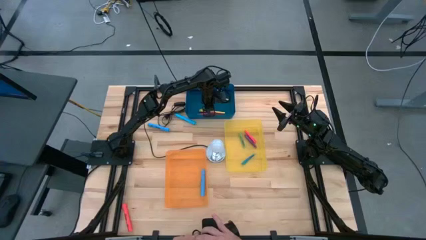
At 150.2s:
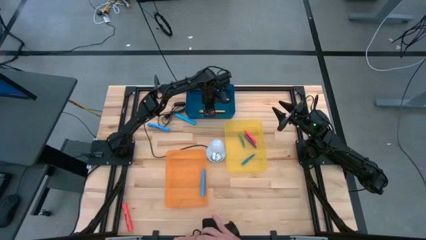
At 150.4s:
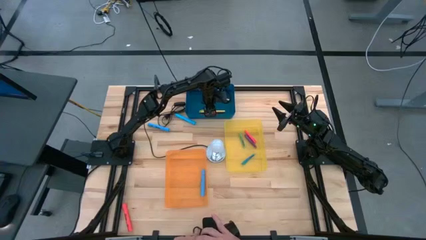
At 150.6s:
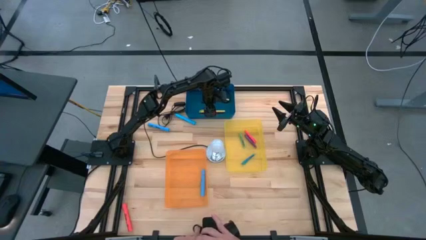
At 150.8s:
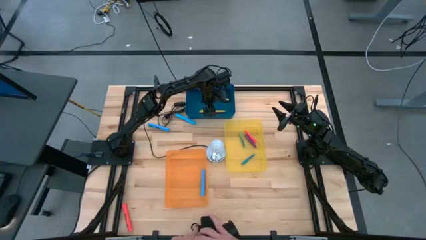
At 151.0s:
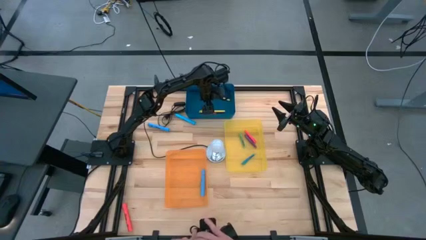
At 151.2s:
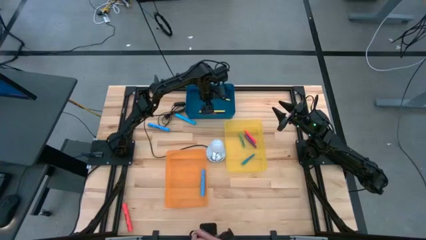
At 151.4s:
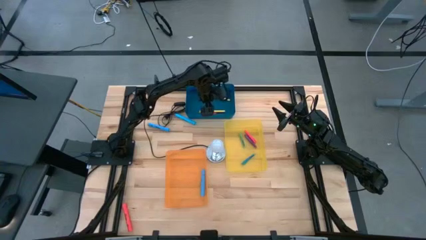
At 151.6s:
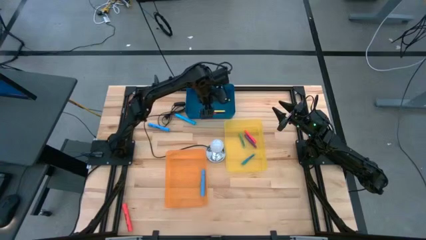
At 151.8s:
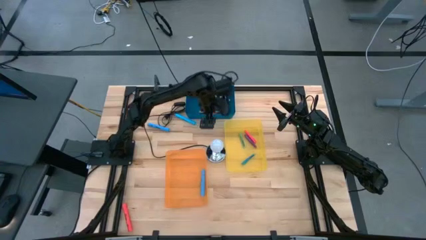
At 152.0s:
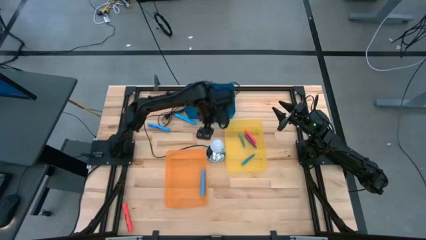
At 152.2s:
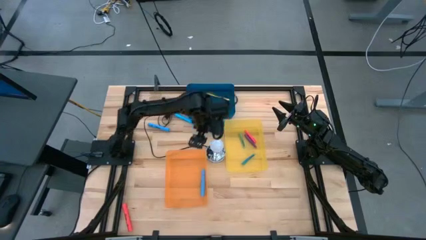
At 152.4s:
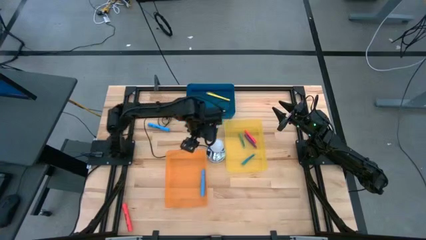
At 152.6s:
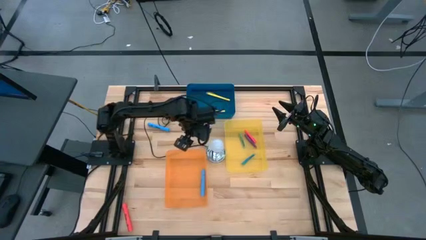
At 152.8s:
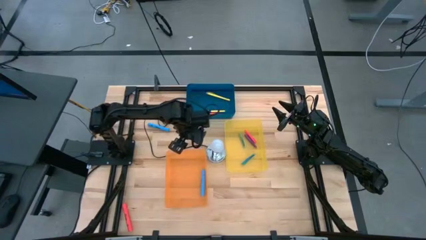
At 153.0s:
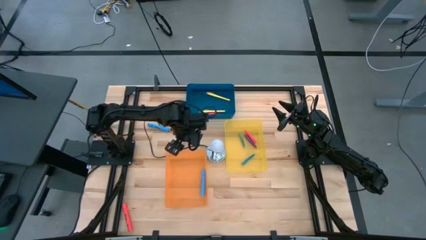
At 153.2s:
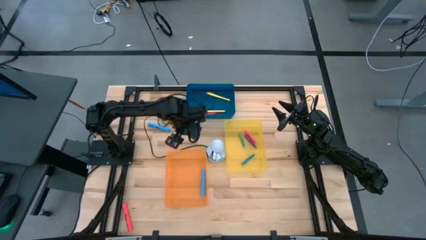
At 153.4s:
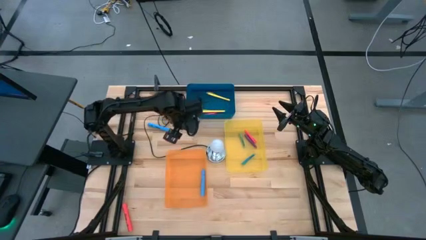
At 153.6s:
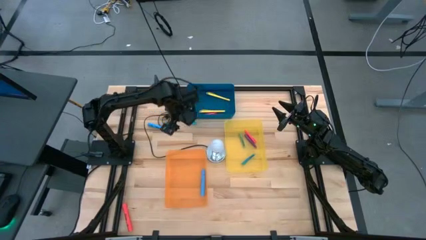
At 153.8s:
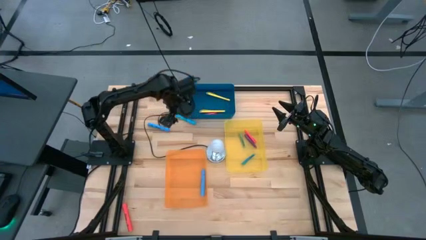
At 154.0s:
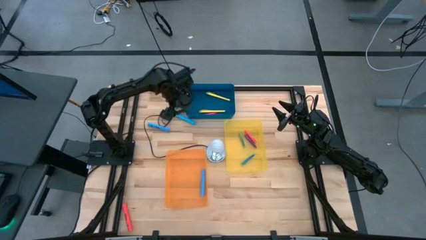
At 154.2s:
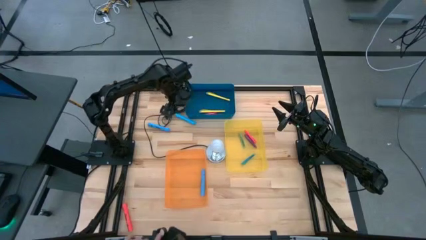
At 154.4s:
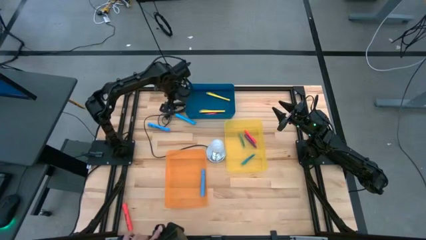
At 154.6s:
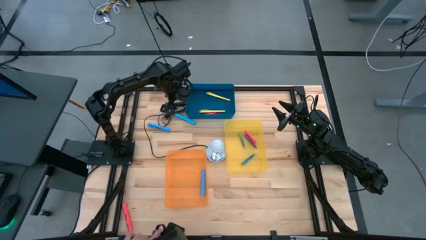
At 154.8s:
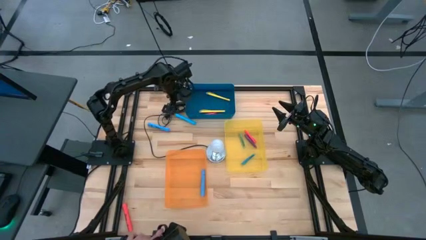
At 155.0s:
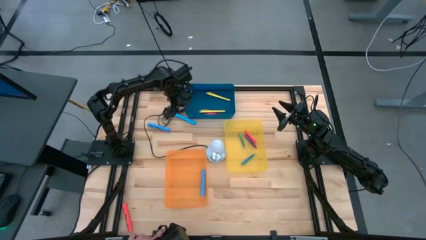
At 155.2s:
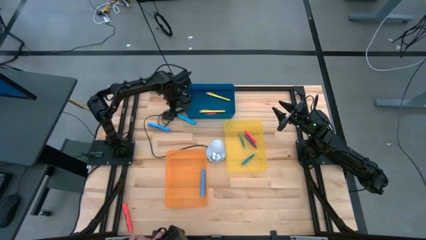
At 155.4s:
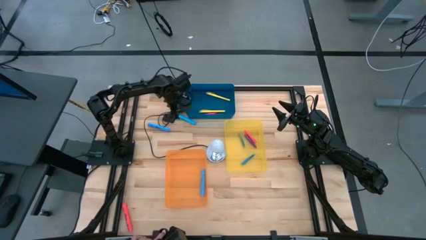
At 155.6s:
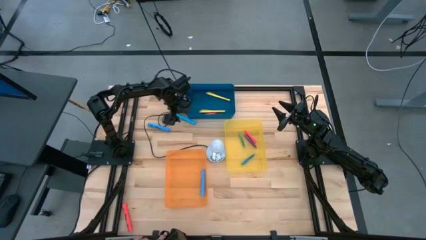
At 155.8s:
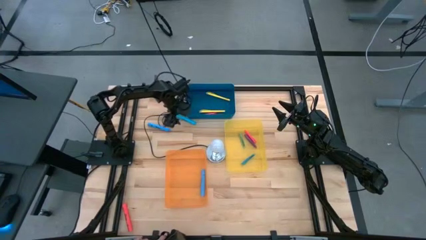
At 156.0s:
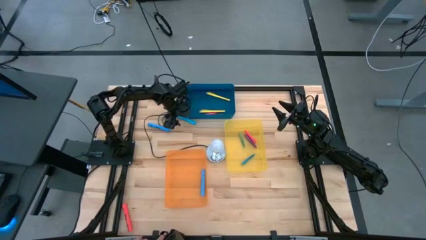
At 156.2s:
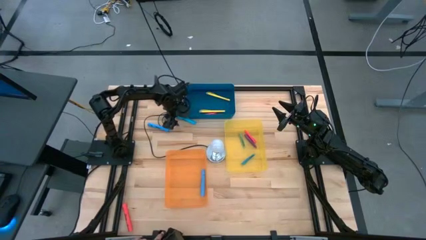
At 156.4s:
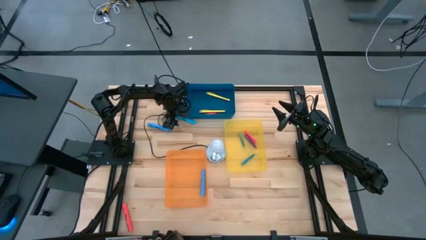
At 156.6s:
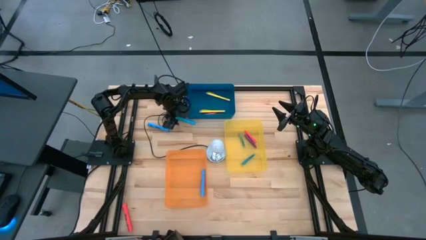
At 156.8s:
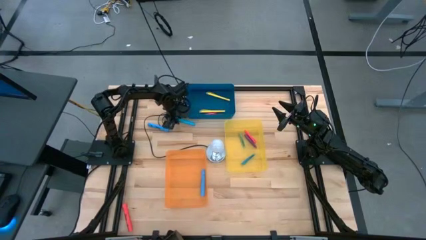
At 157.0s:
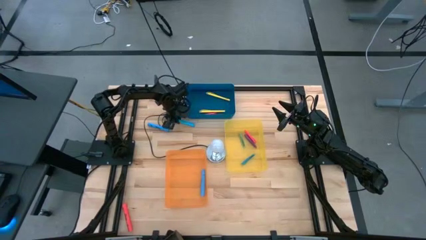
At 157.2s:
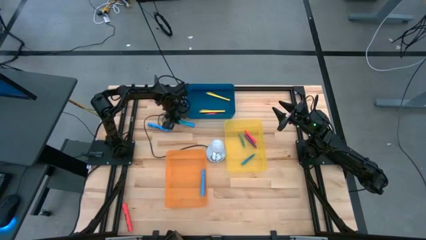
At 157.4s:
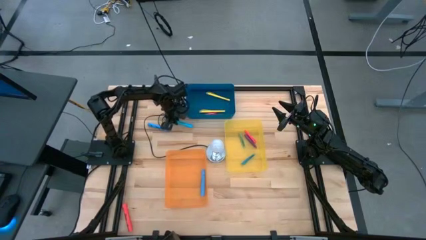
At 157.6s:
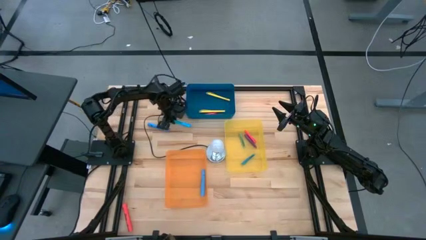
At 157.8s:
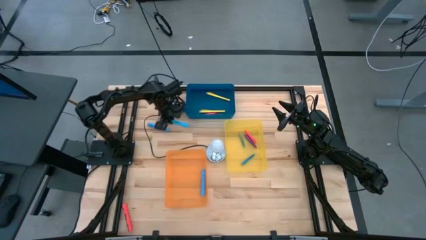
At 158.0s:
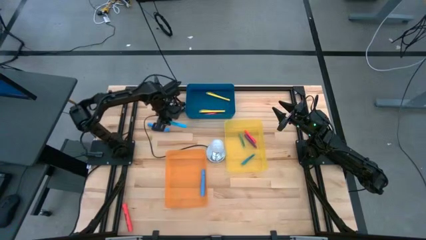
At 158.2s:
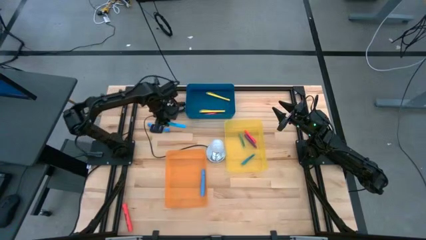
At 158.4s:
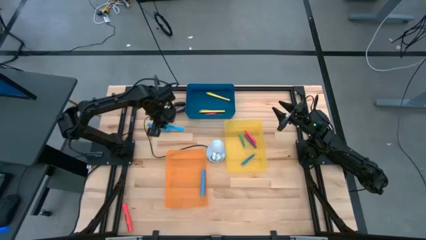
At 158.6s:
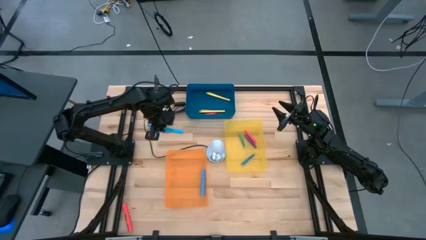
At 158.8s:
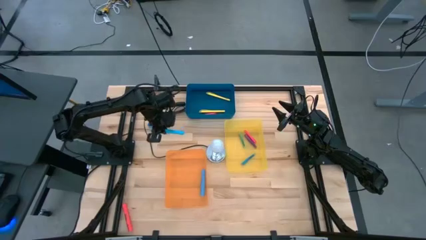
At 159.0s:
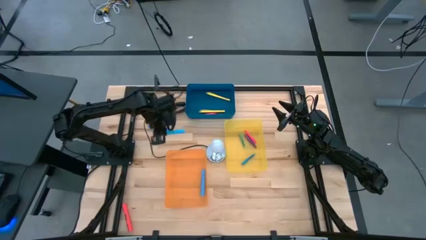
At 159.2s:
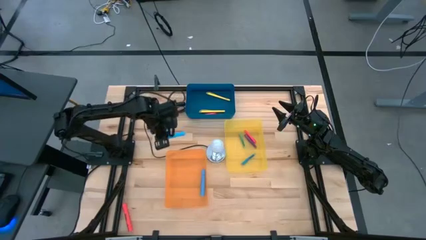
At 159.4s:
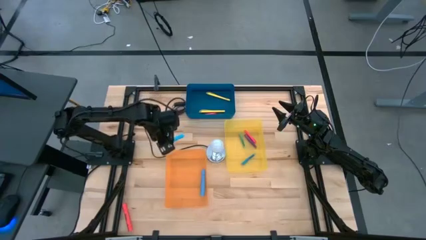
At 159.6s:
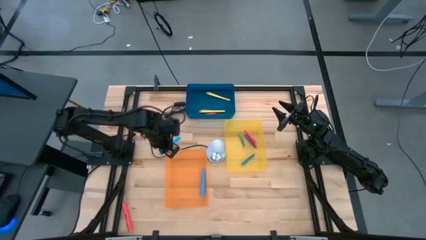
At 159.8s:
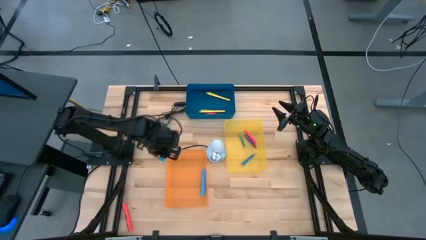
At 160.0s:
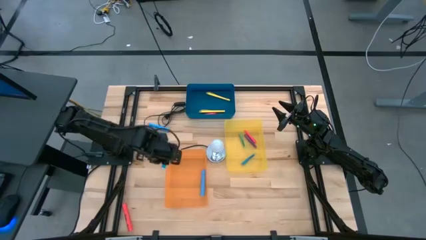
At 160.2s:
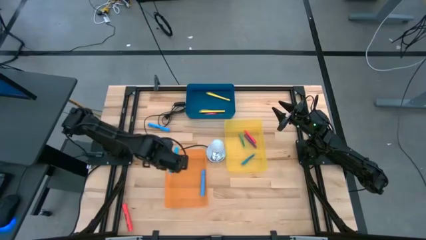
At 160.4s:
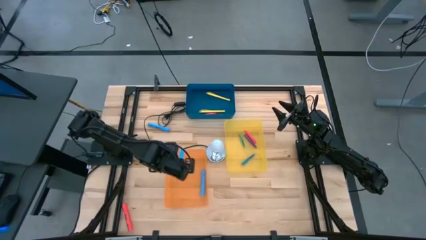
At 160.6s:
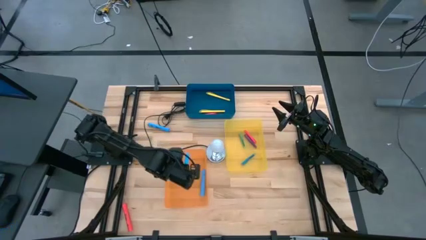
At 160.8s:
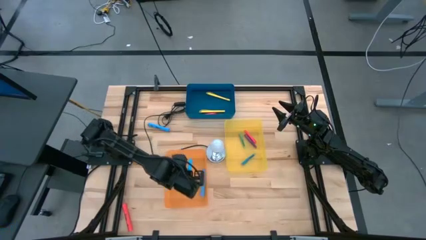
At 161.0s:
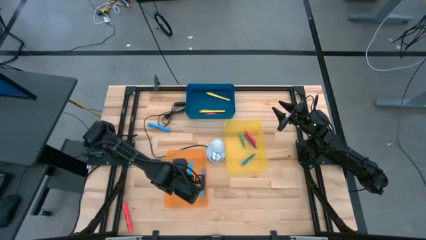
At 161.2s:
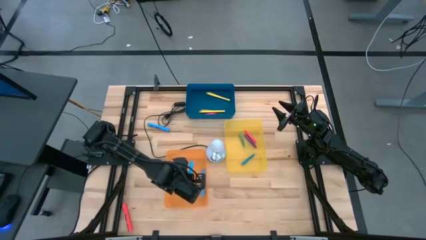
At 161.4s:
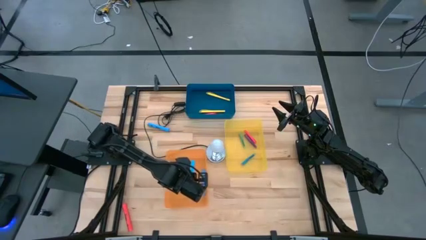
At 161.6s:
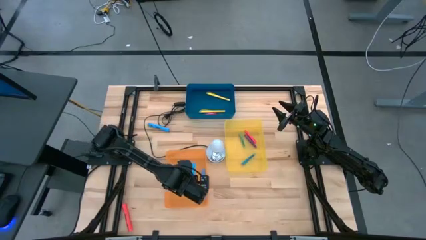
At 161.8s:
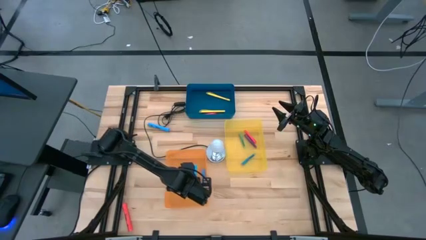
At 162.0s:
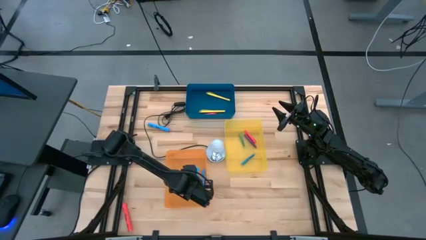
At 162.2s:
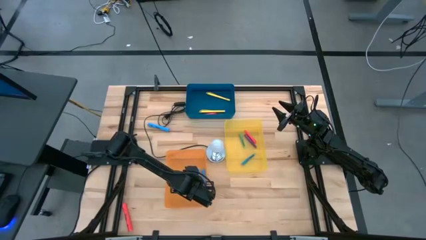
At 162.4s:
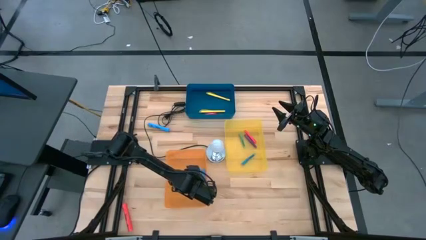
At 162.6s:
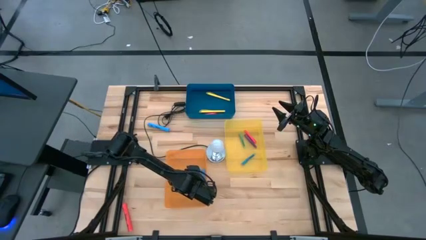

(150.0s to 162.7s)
Task: Pick & Place Markers
Put the top blue highlighter pen into the orange bin
